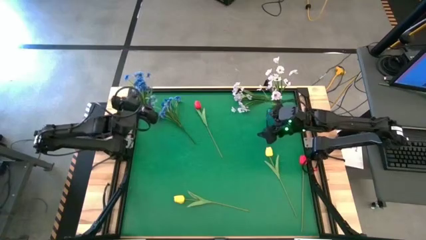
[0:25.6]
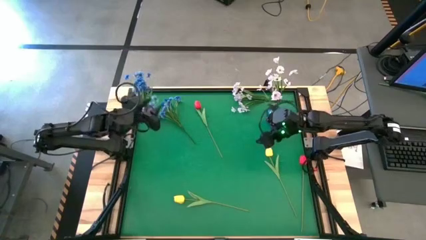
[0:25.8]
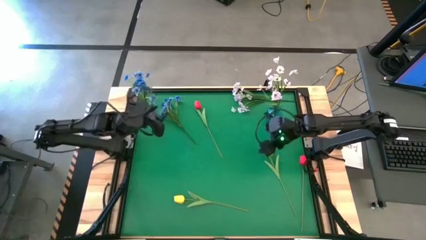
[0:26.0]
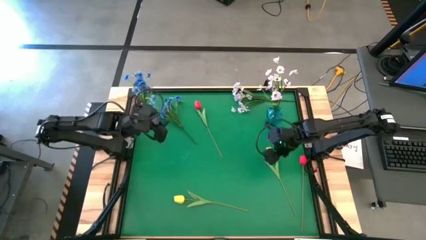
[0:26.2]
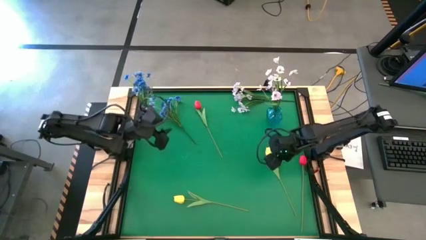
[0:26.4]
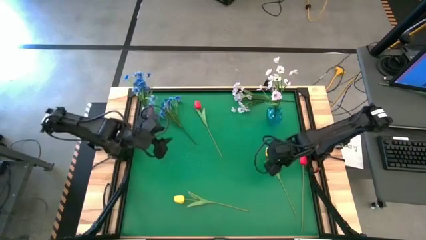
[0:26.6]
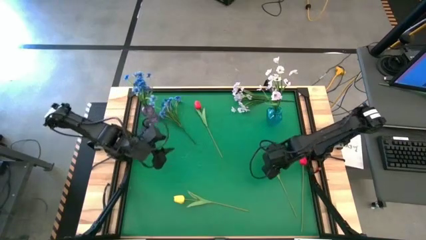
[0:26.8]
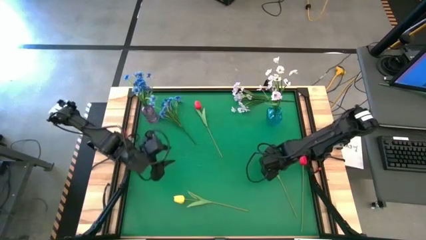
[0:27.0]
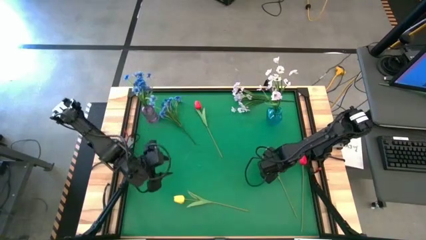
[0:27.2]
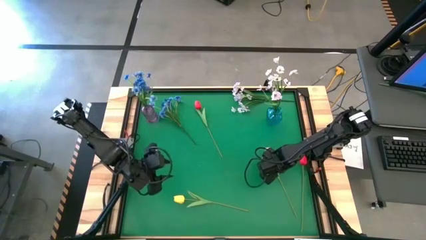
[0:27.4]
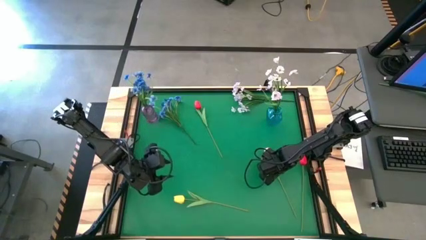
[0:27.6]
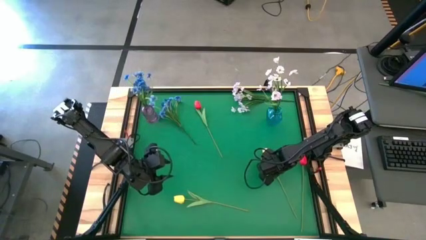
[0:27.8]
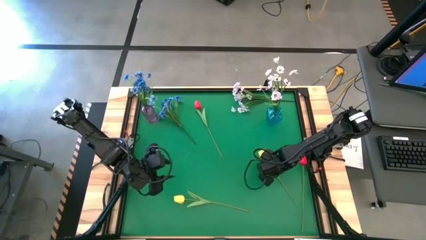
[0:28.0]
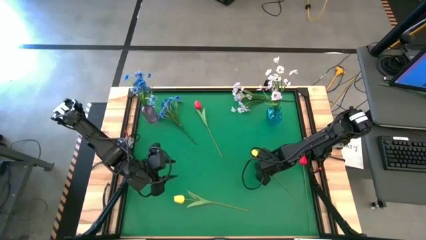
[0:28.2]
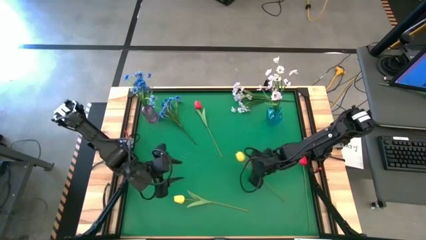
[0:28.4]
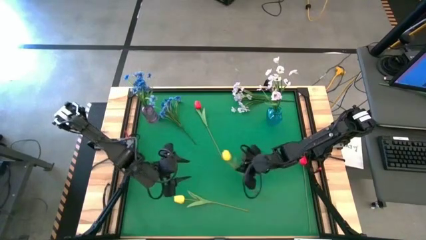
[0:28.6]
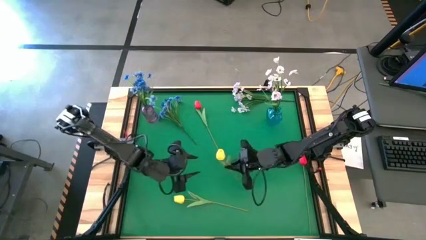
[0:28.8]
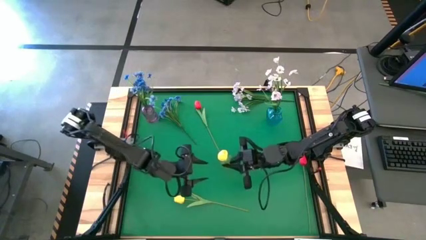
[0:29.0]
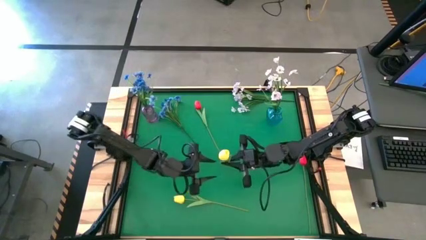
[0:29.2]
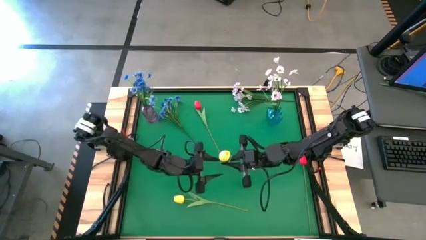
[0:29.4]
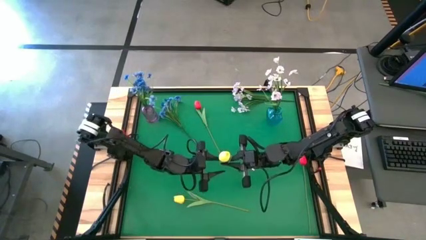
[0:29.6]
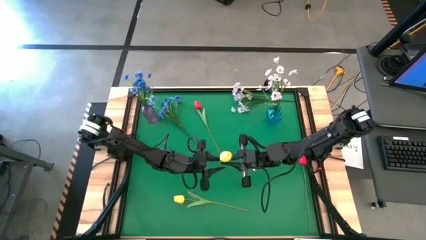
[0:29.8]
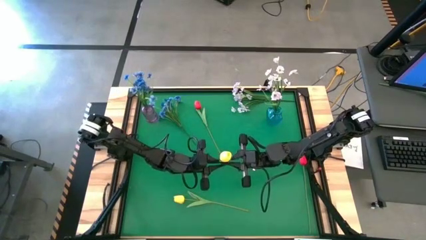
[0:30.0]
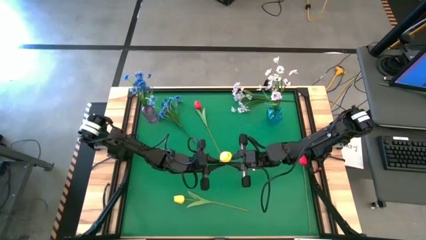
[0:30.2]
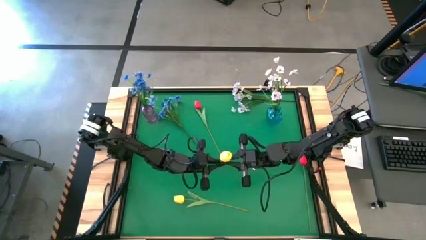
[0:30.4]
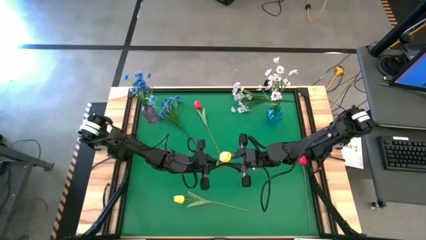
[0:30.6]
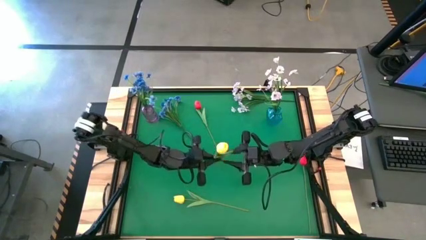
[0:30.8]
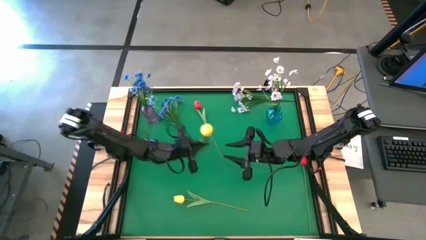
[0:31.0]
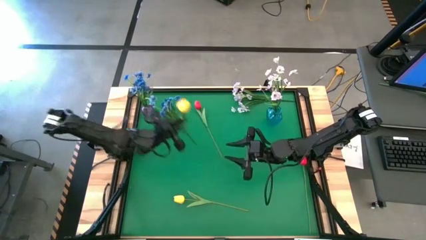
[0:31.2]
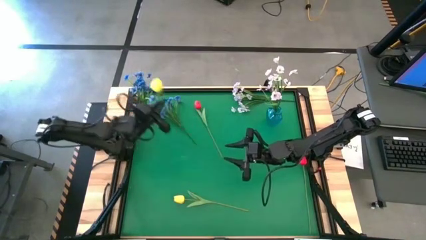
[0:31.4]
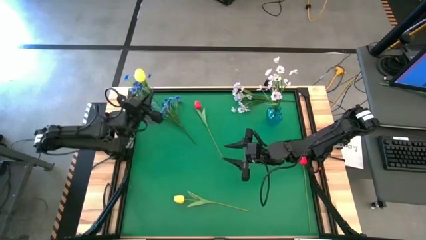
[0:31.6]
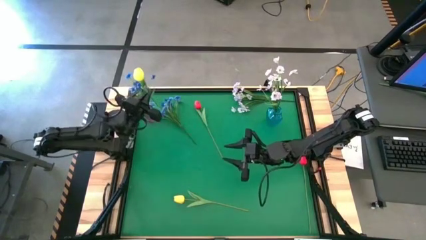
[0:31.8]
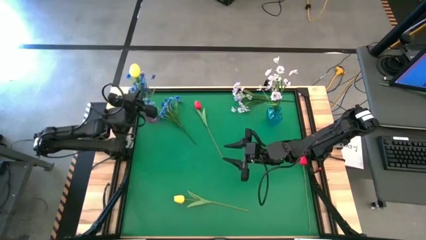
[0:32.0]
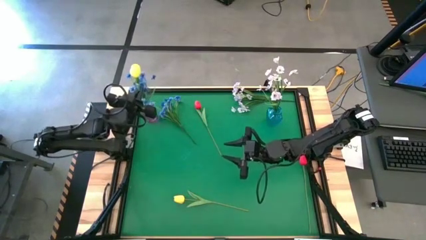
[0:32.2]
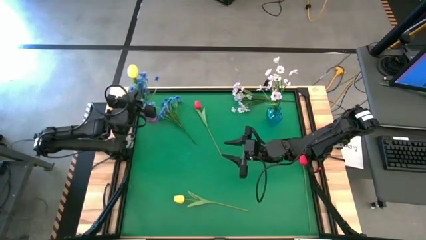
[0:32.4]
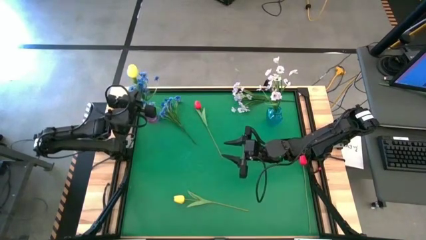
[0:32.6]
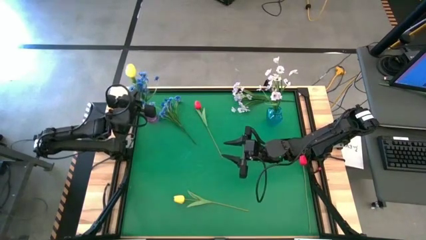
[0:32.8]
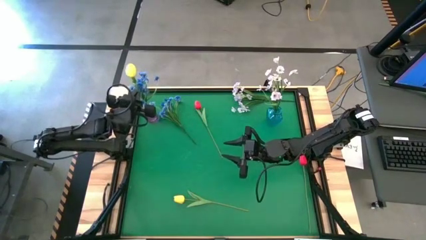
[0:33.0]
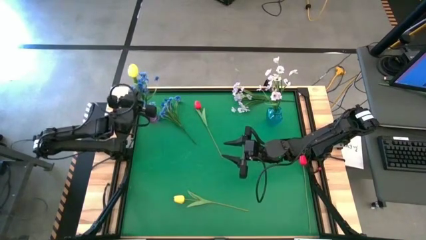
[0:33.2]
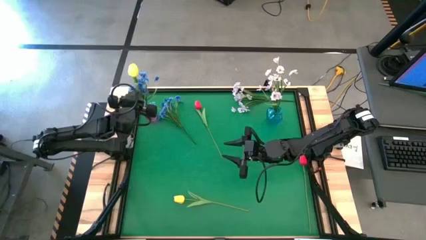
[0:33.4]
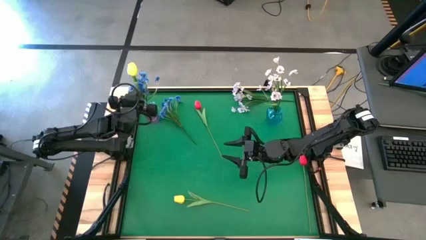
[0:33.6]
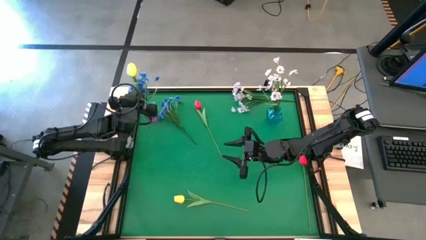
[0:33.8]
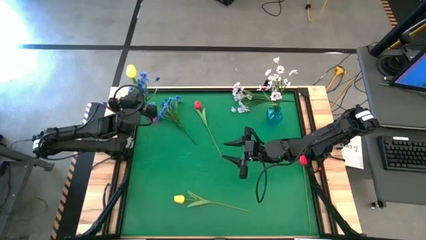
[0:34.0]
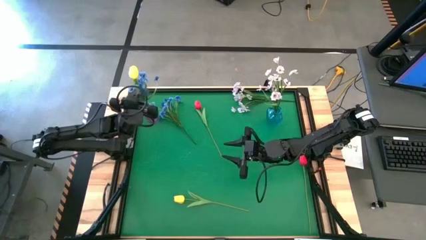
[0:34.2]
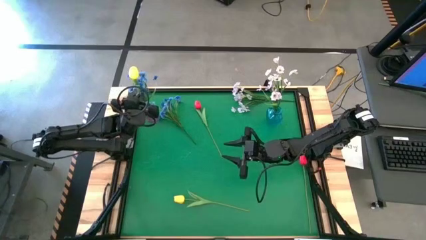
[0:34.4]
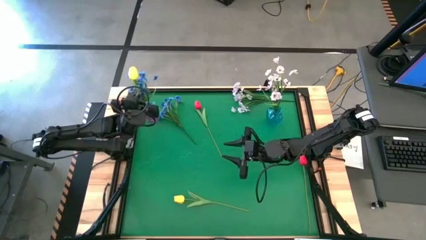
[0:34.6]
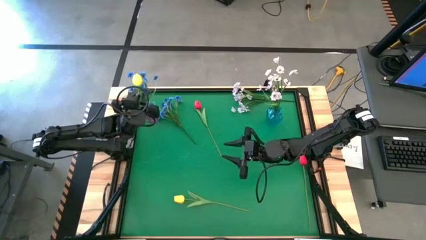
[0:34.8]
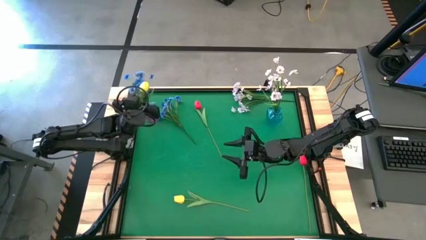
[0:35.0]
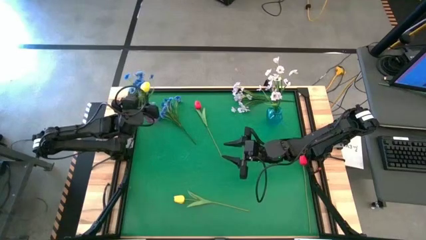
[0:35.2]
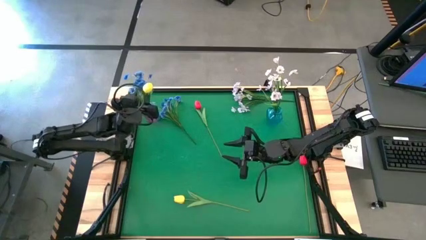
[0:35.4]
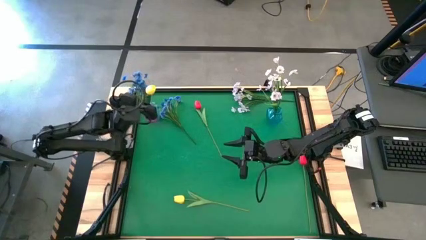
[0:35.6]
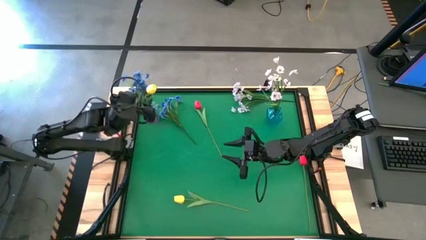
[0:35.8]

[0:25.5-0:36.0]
Task: Sort flowers into vase by color
Put the right yellow tulip into the purple vase
